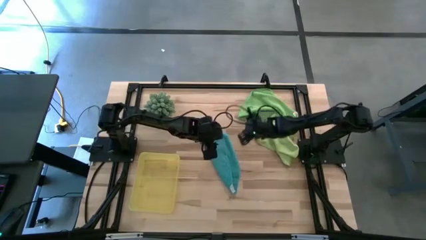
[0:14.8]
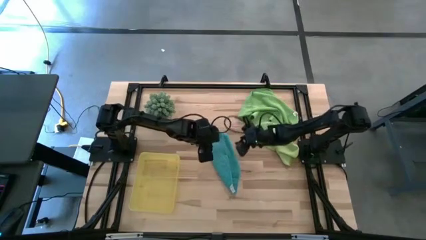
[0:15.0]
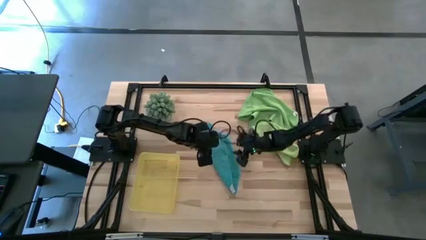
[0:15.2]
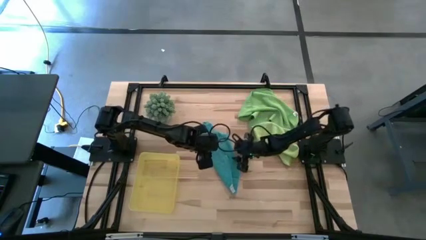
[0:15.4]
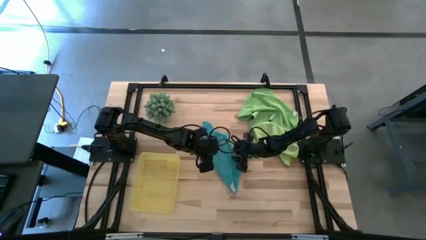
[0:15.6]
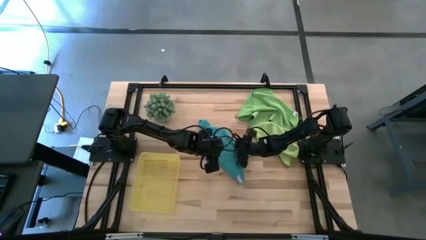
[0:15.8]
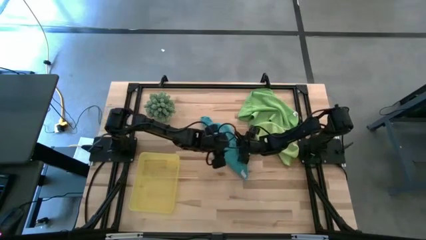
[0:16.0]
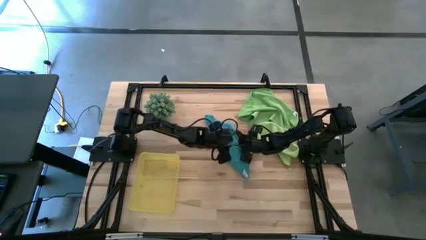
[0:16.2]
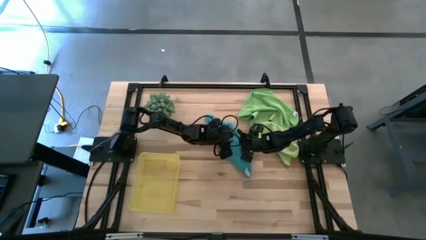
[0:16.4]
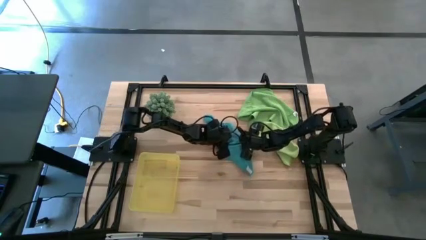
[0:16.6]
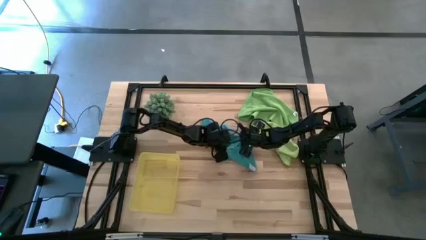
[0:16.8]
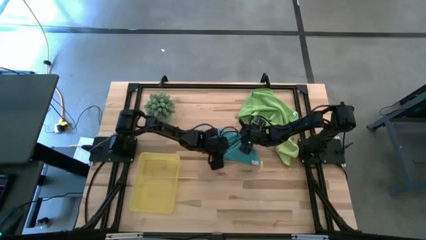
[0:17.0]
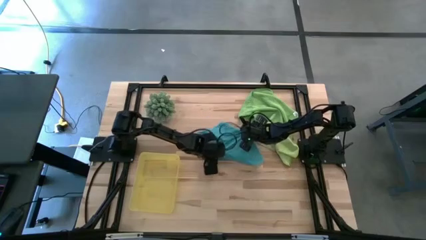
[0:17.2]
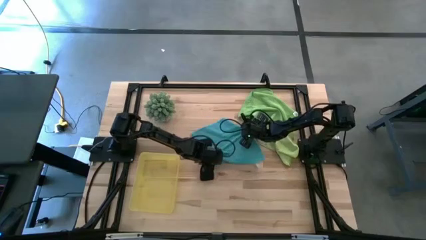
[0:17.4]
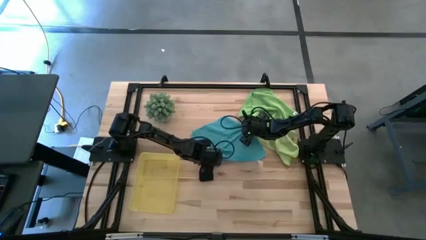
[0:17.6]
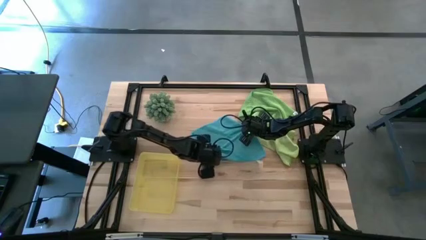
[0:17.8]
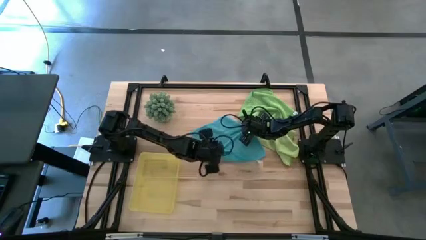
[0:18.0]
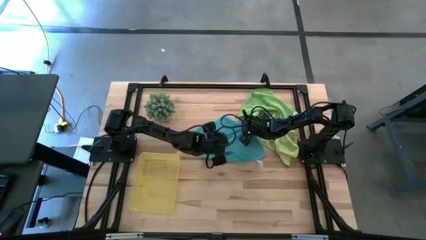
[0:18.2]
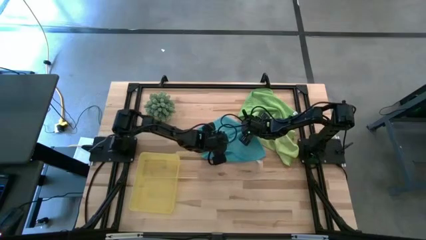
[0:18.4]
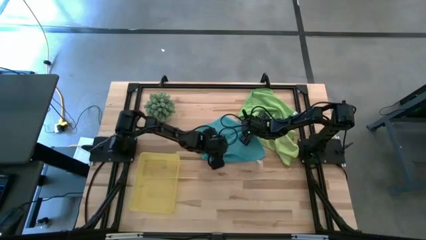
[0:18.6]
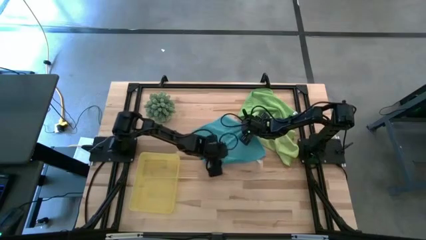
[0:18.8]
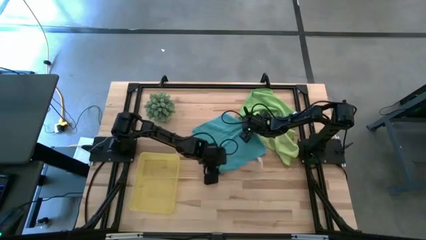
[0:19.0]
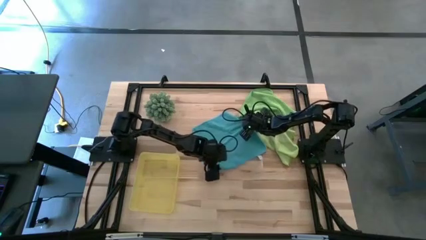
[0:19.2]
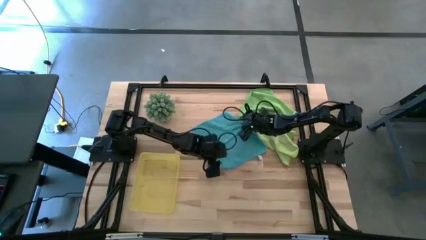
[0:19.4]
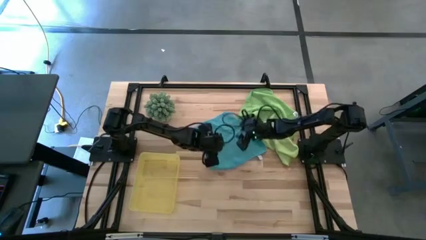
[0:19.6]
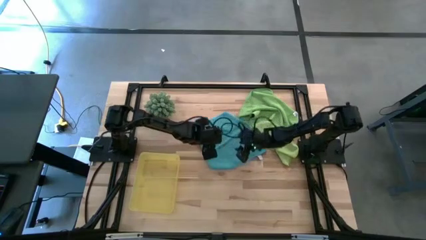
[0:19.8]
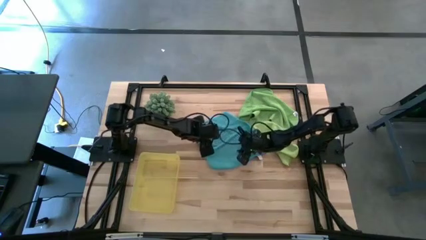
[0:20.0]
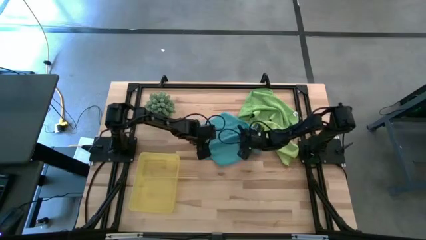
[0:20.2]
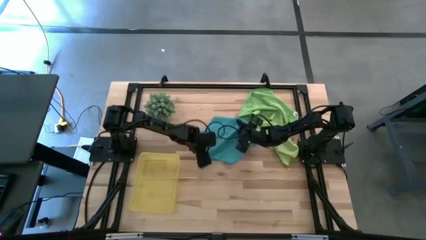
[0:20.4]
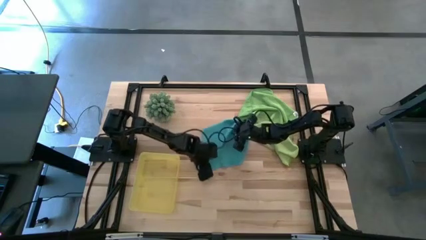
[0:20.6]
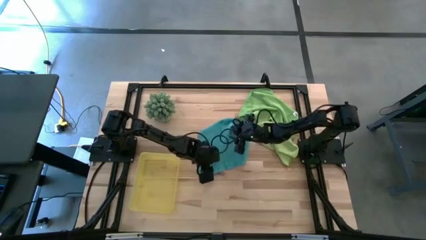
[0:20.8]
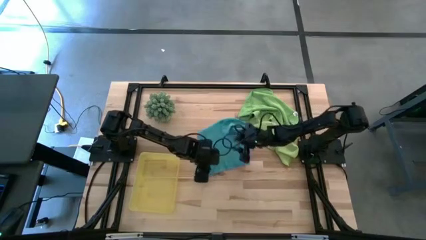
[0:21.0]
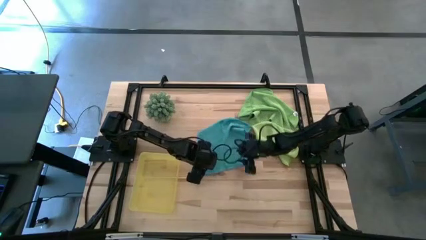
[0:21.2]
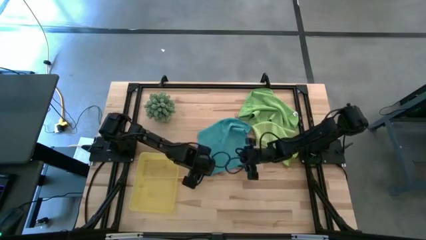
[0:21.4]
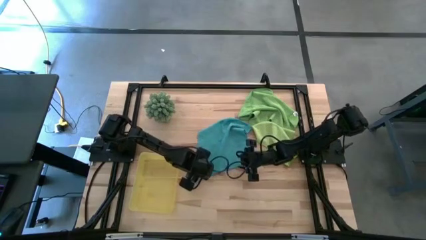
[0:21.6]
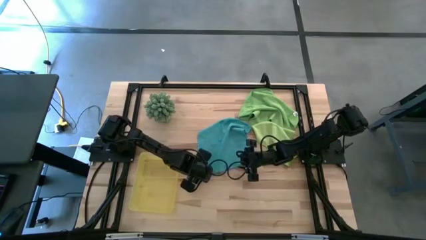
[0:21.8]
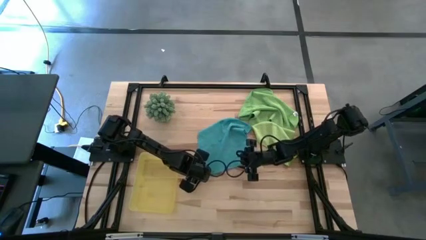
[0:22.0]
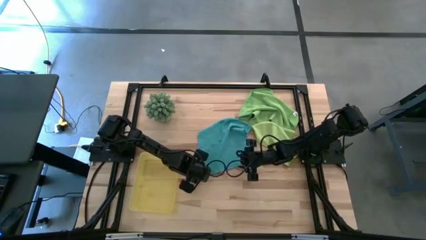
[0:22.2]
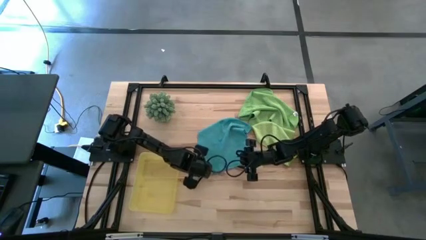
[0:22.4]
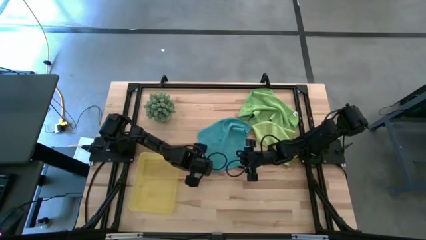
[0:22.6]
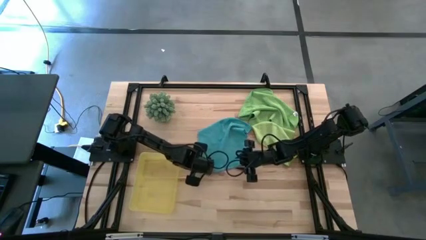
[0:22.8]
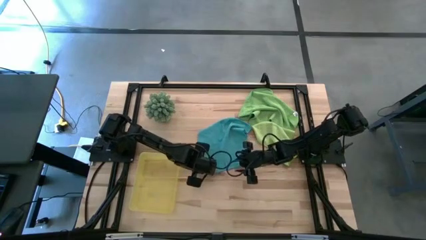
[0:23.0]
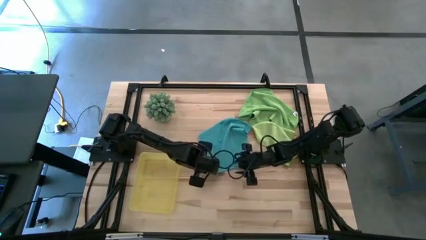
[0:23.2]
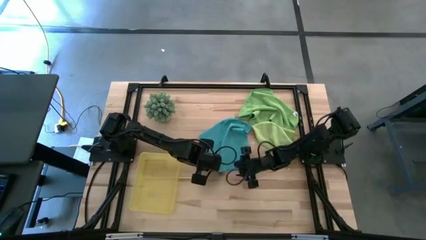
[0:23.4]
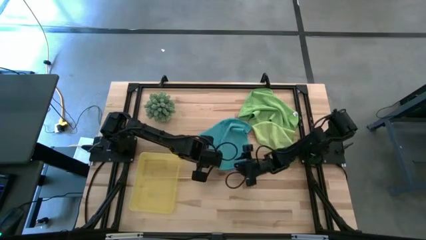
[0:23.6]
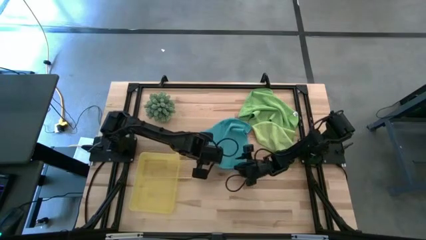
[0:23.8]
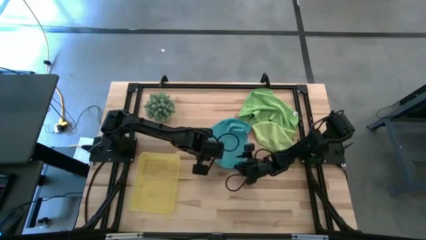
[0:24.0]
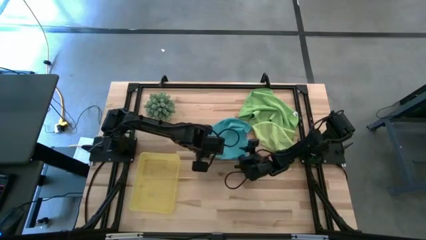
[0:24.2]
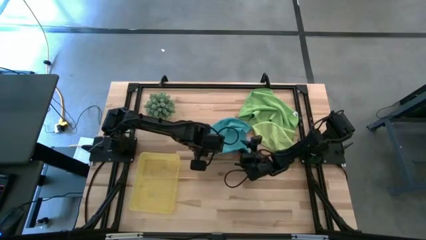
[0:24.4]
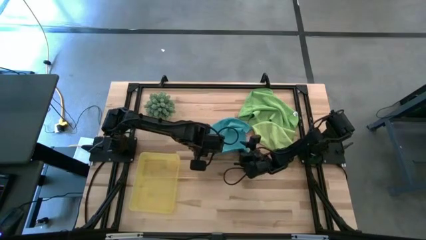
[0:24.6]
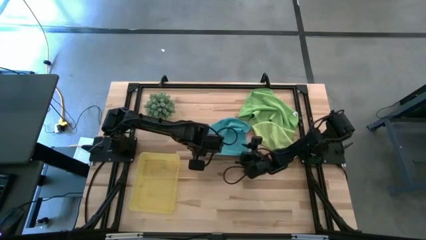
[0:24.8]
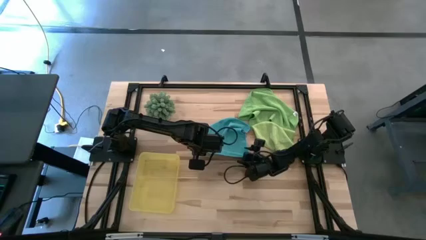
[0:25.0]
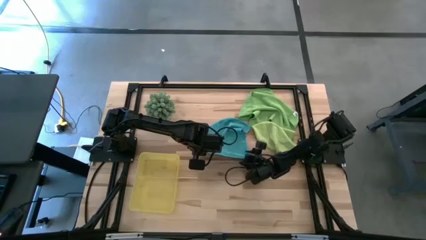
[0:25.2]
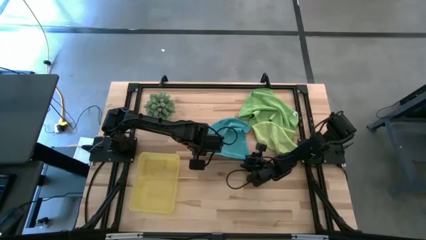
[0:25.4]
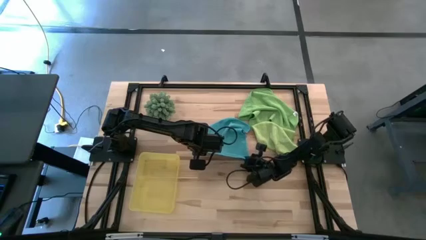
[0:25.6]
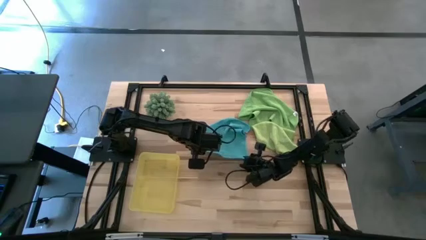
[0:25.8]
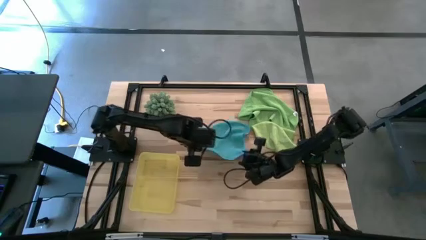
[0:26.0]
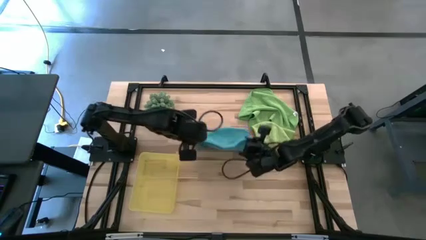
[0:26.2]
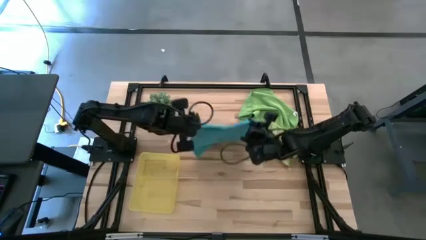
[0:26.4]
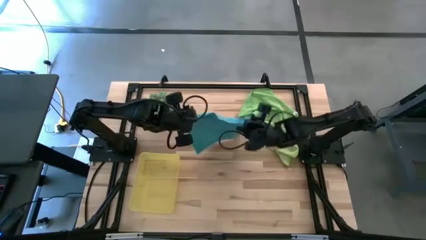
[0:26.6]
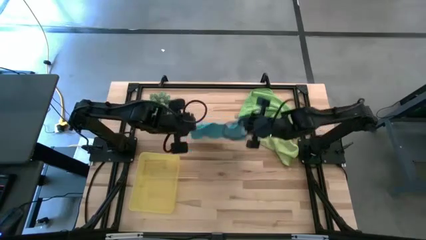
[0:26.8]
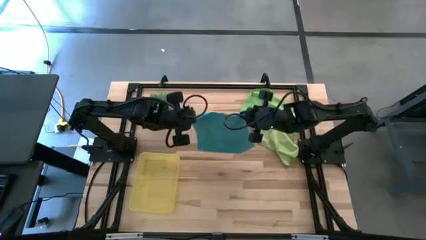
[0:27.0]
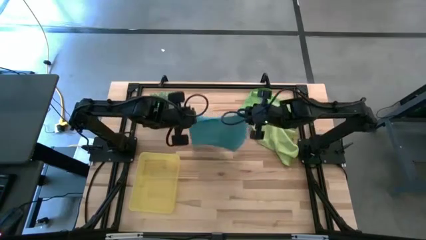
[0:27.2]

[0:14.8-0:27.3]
Task: Roll microfiber towels into tight, uniform cylinder then place into a basket
Fold the blue towel

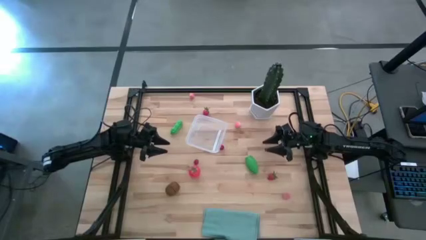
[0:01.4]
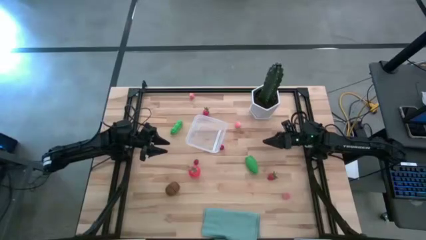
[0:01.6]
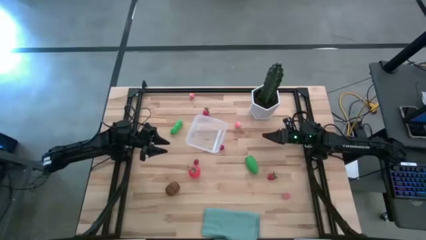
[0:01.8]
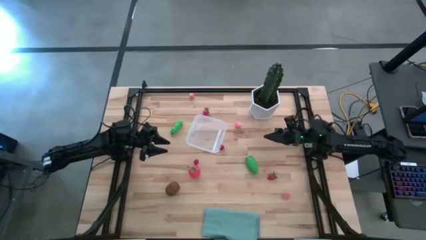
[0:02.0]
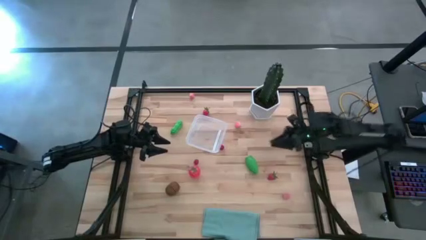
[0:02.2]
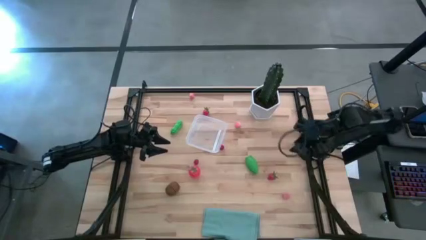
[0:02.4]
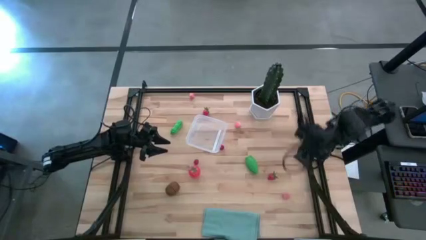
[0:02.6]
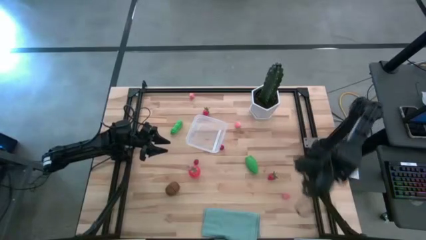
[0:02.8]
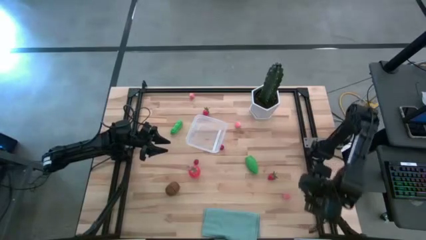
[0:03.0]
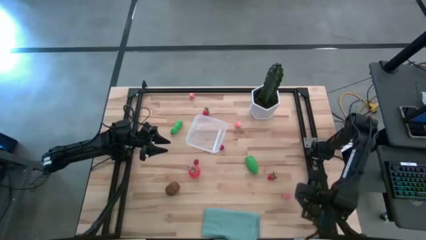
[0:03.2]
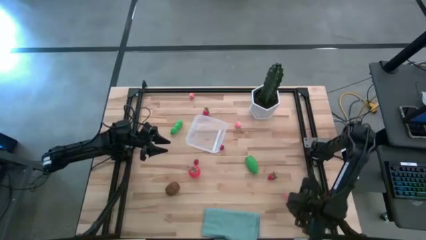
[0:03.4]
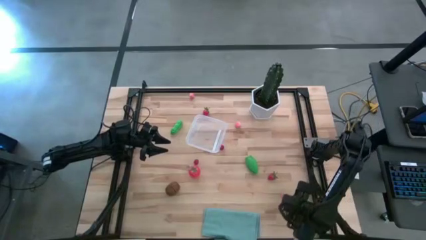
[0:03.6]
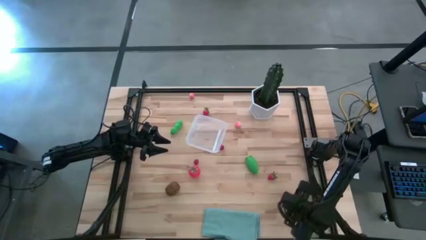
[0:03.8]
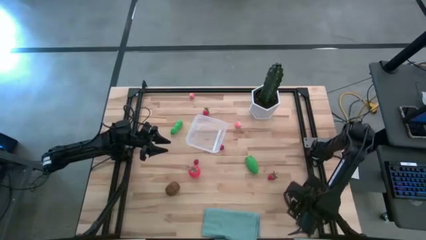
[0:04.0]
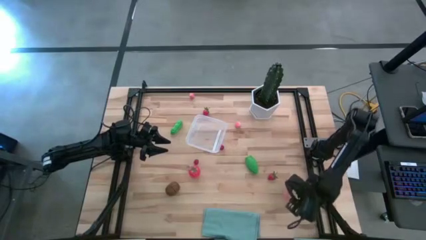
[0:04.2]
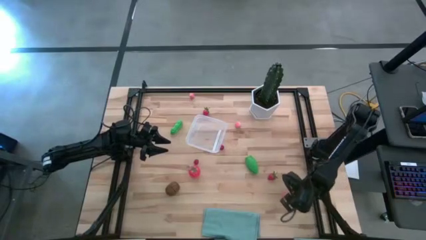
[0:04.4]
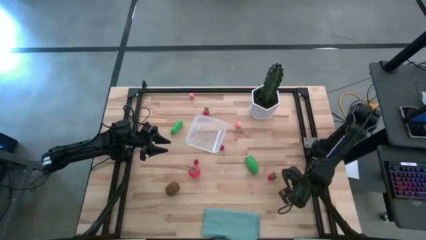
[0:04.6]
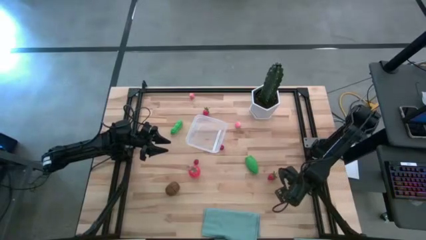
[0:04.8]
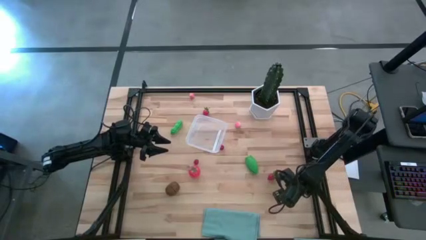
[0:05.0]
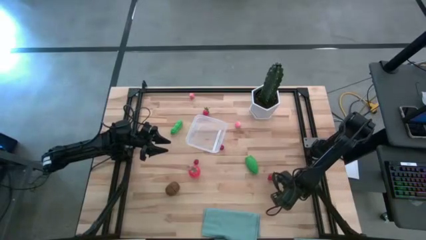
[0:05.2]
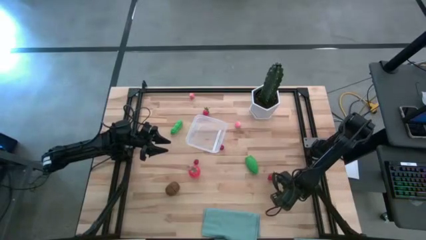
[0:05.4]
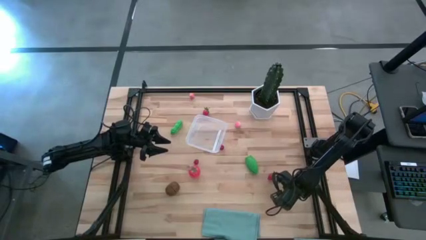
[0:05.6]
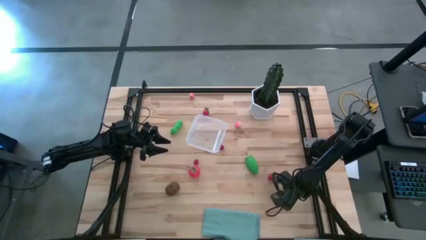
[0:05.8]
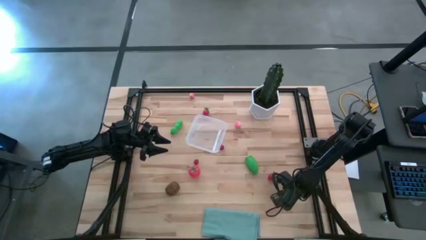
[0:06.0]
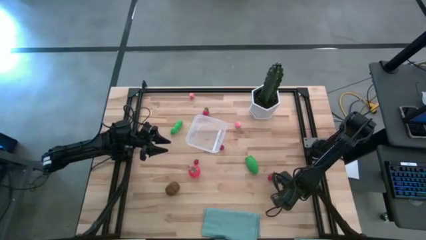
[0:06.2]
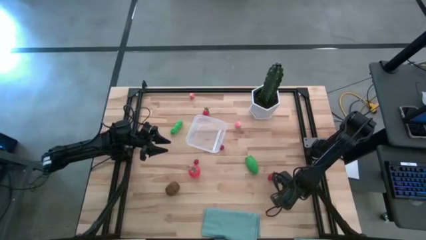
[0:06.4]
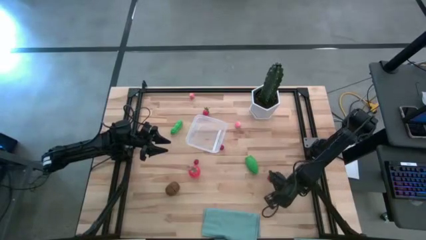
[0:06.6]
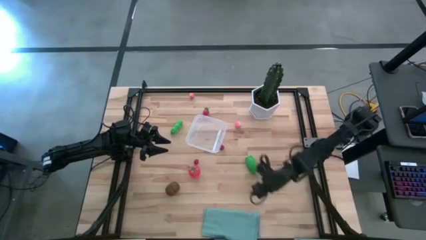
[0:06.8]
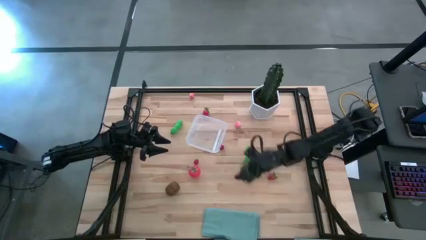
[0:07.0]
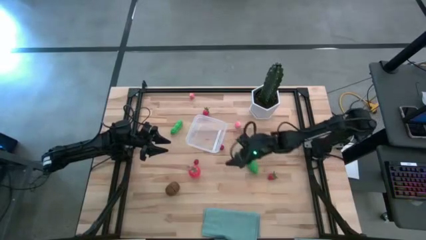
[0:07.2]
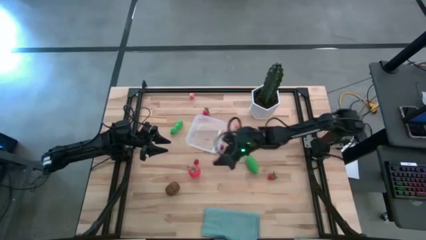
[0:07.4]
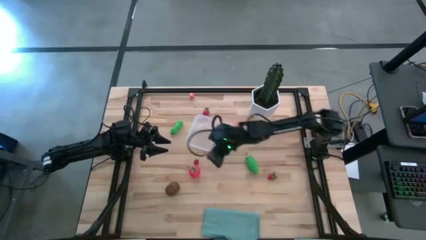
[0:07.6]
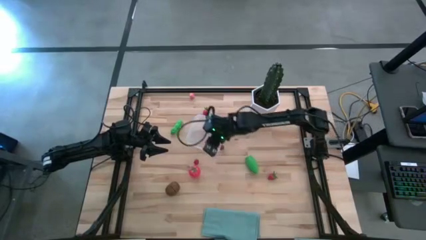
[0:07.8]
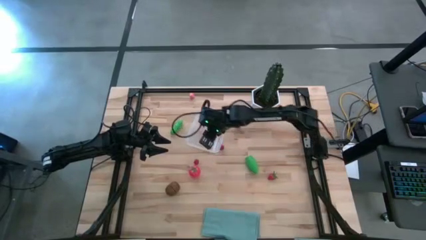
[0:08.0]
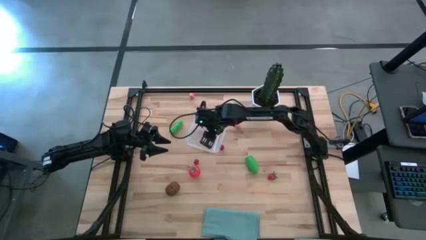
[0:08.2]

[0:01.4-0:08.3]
Task: Pick and placing Produce into tupperware
Put the bottom pink peach into the transparent bin
